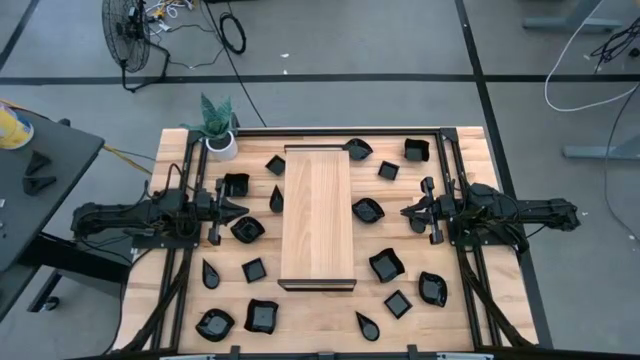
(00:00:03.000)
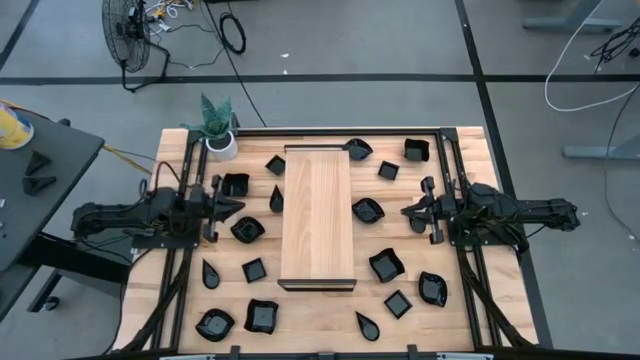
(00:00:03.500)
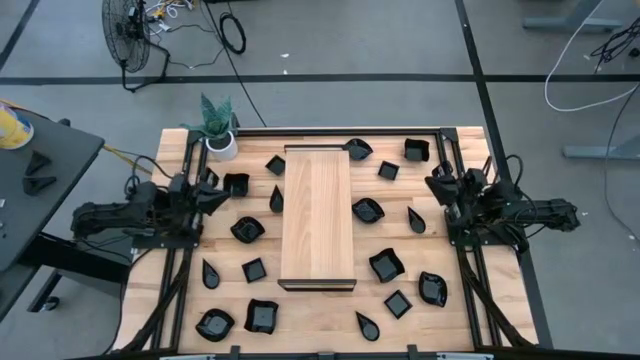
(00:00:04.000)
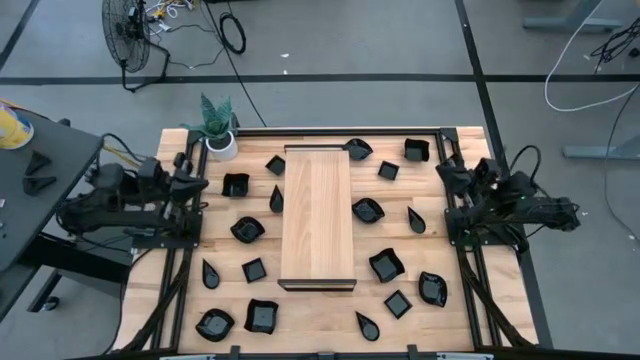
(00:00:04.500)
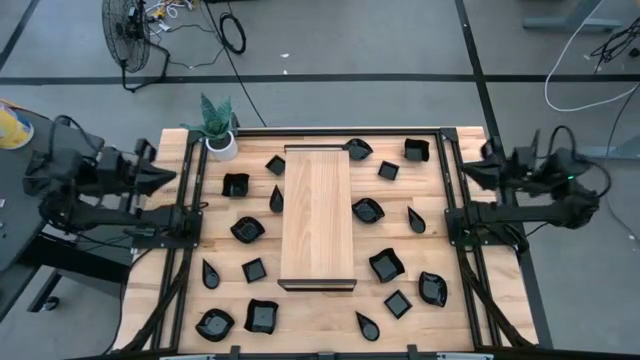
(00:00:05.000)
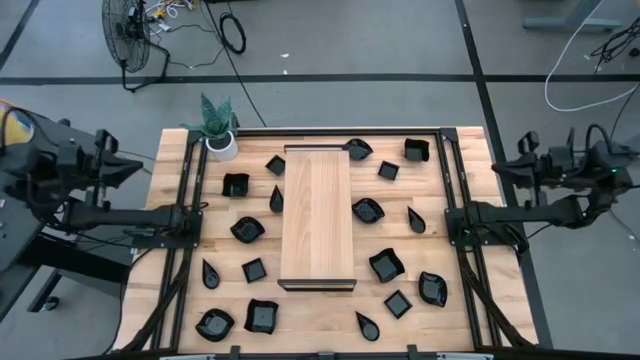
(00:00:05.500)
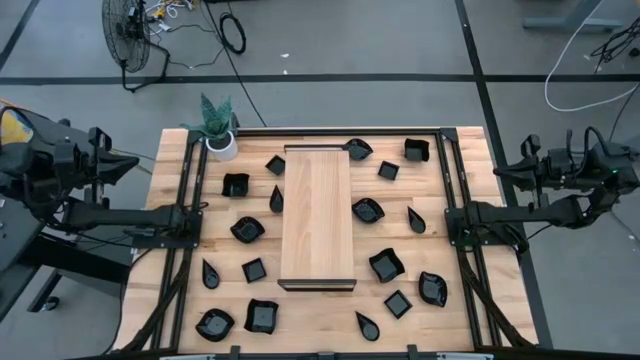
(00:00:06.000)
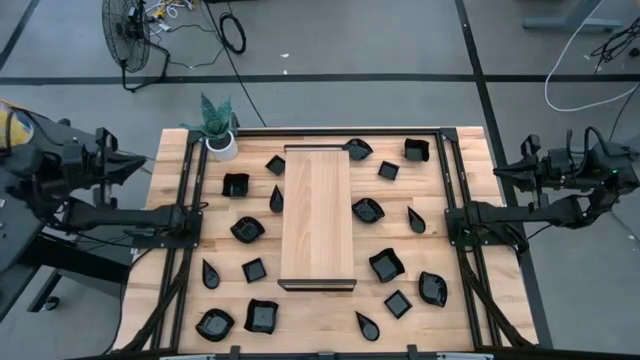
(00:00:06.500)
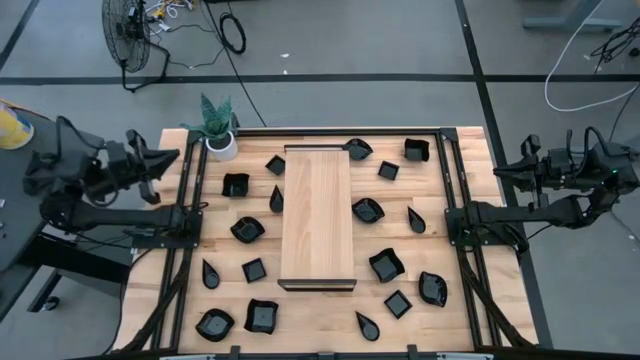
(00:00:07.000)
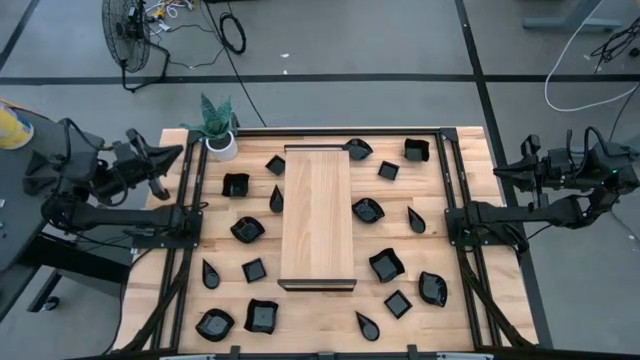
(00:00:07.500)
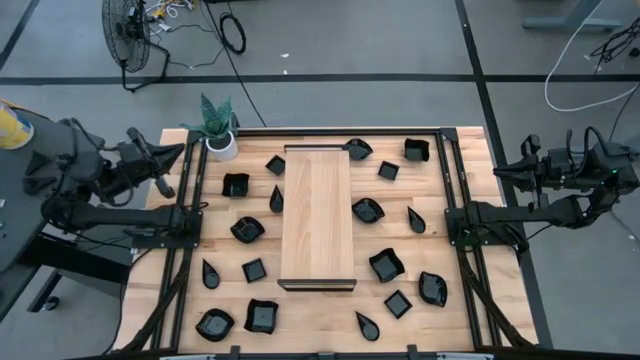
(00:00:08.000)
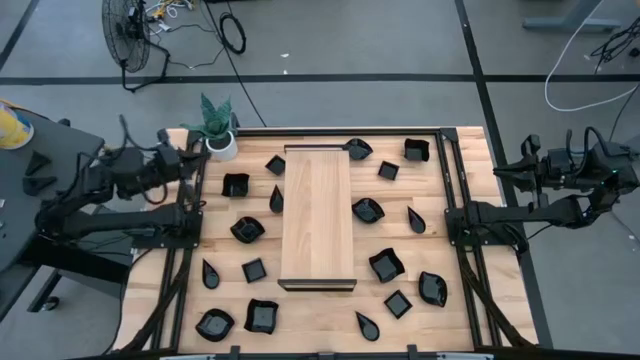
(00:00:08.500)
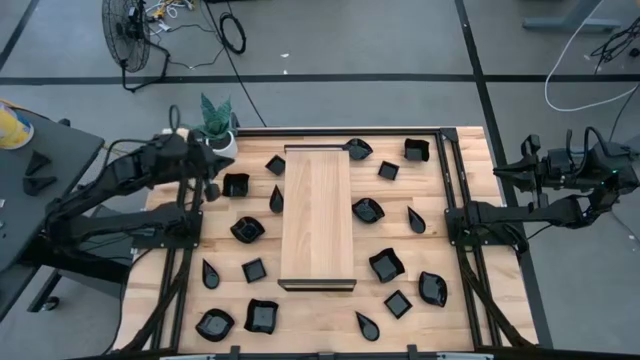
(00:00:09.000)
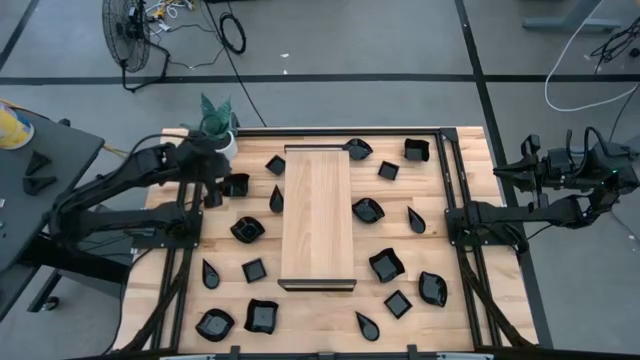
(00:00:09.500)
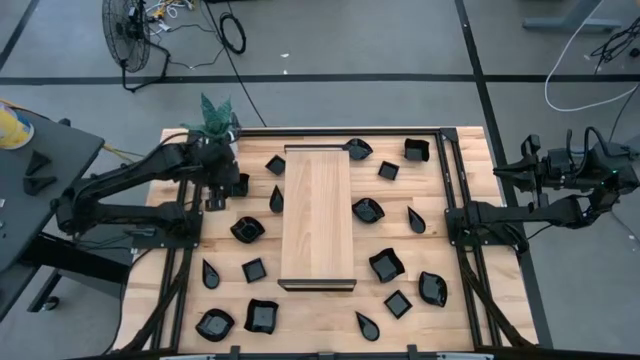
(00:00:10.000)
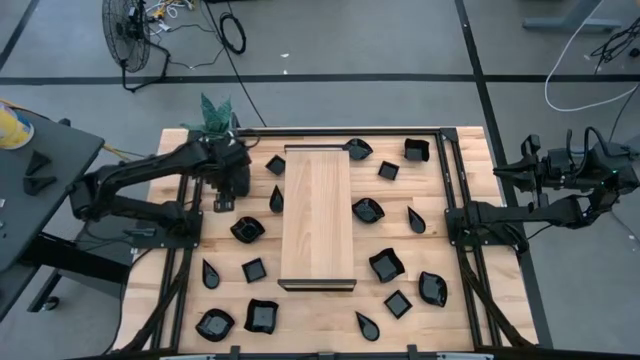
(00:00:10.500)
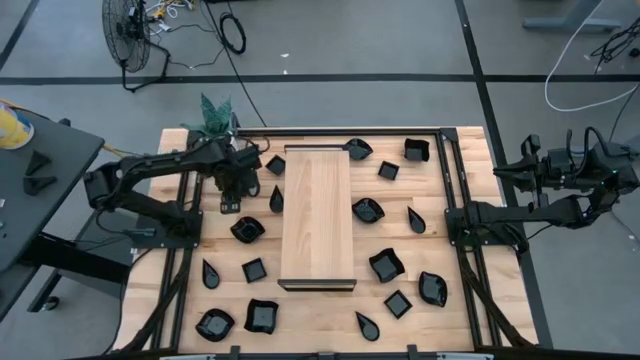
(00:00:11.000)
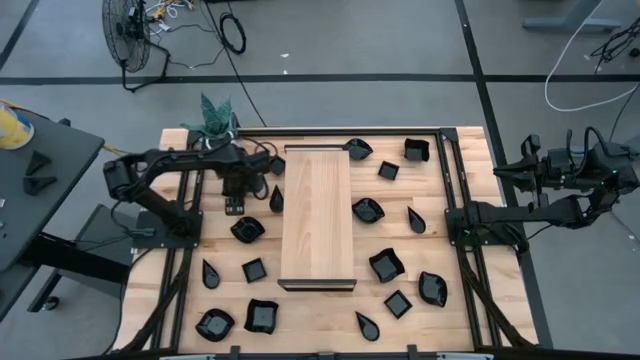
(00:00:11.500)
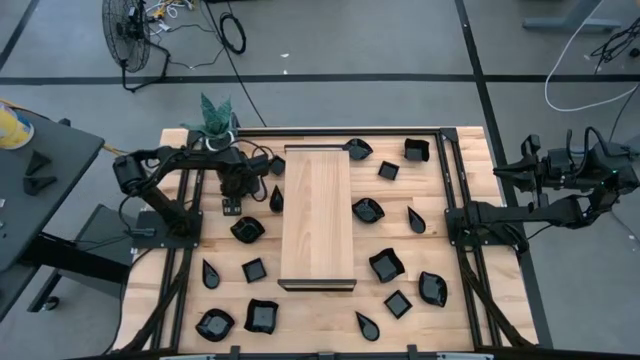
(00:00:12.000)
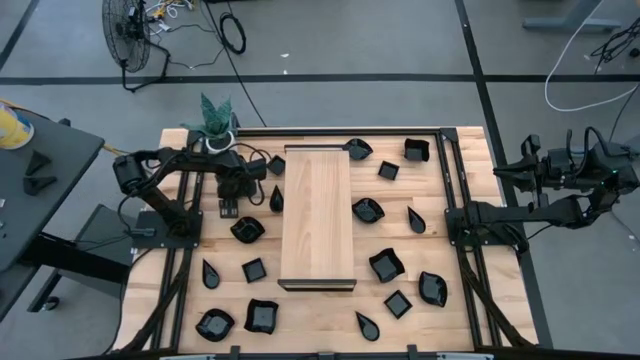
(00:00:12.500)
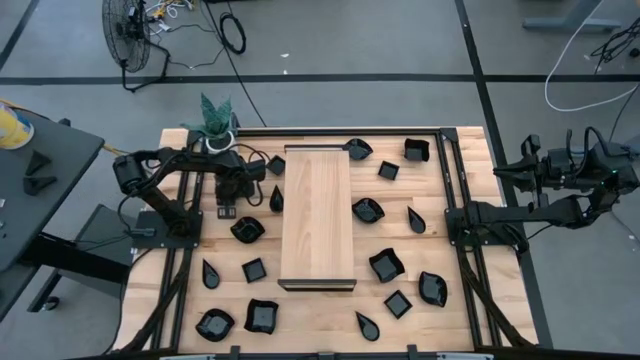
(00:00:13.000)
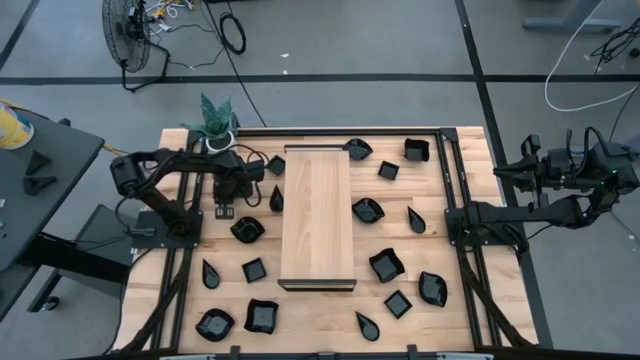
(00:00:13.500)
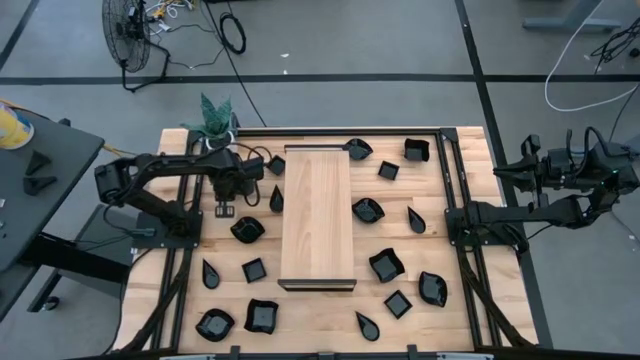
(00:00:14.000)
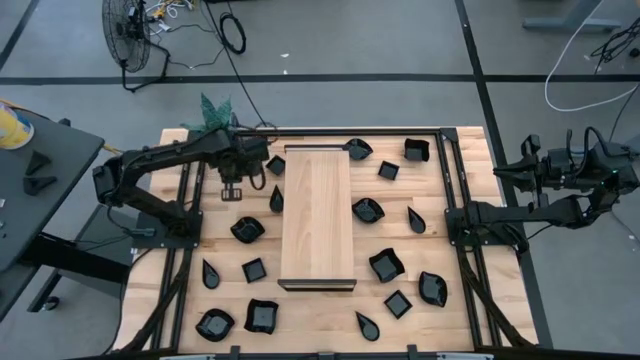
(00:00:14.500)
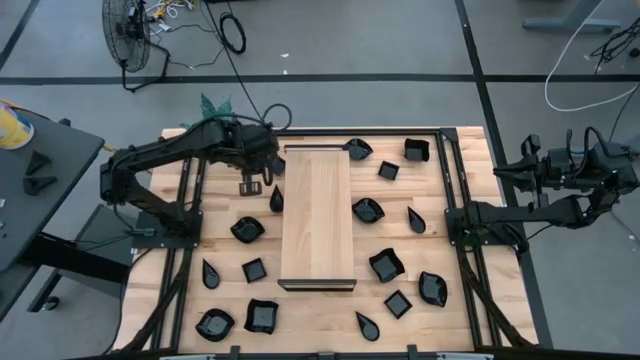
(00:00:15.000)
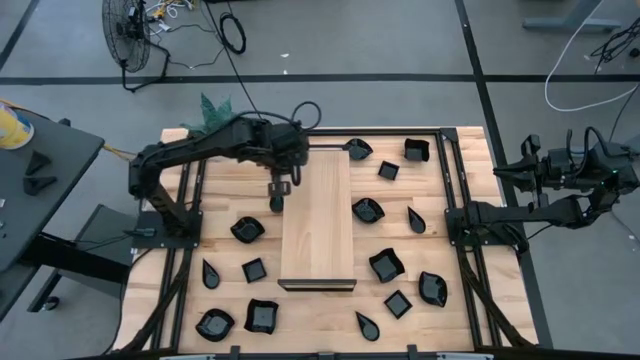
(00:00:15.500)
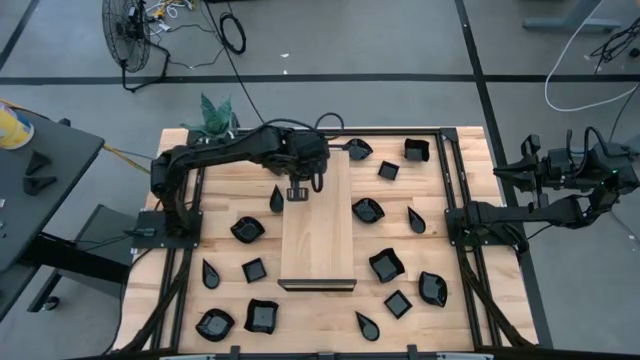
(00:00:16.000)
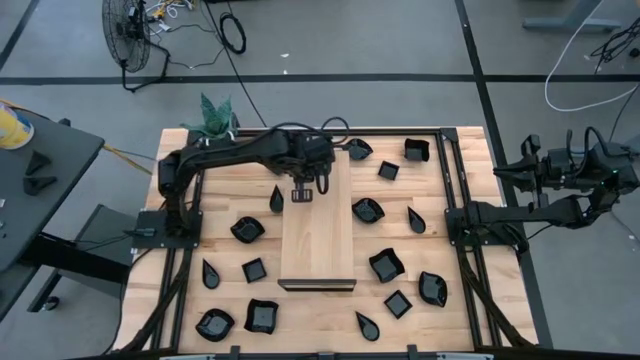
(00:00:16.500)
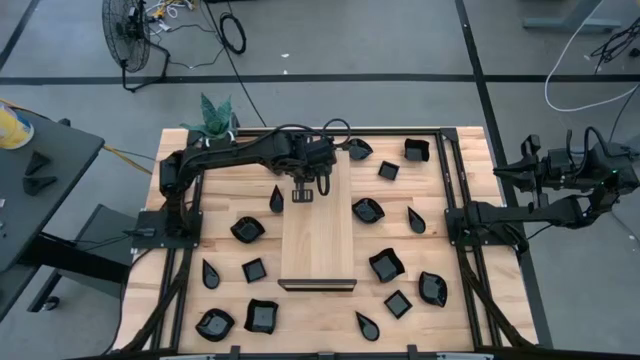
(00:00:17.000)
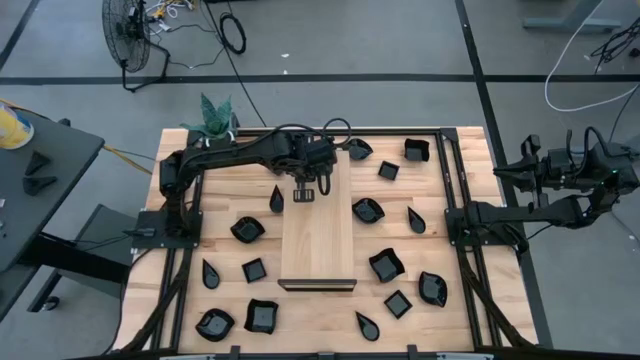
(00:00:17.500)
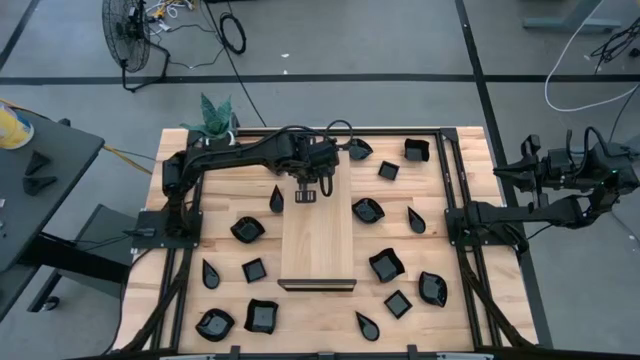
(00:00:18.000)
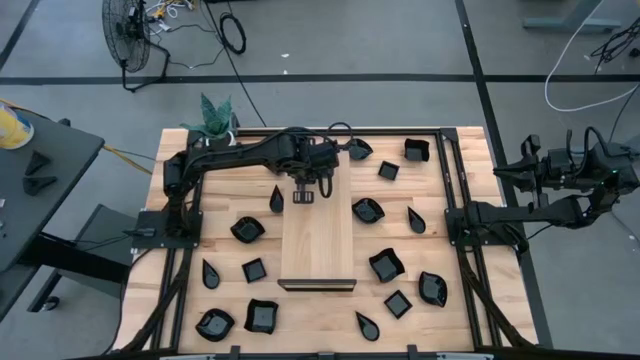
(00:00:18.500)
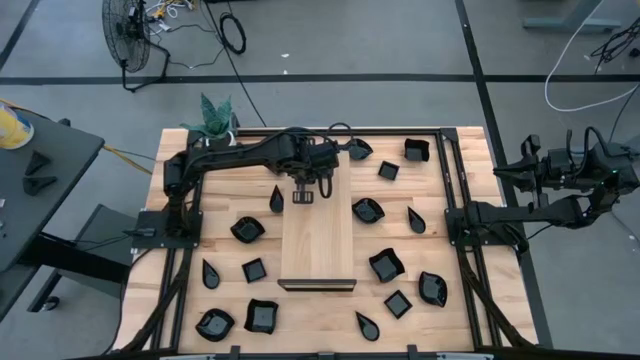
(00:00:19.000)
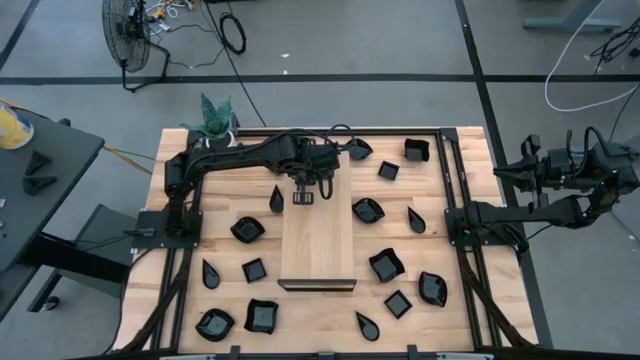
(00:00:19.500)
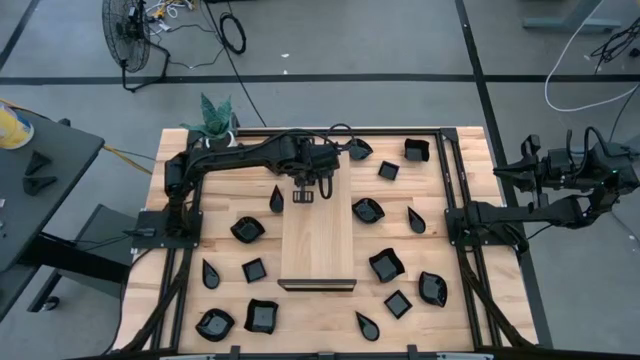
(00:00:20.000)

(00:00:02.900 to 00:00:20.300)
Task: Pick & Place Mini shaped plates
Put the distorted square plate on the shelf

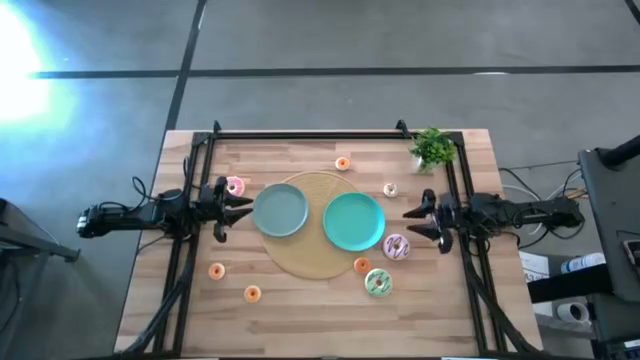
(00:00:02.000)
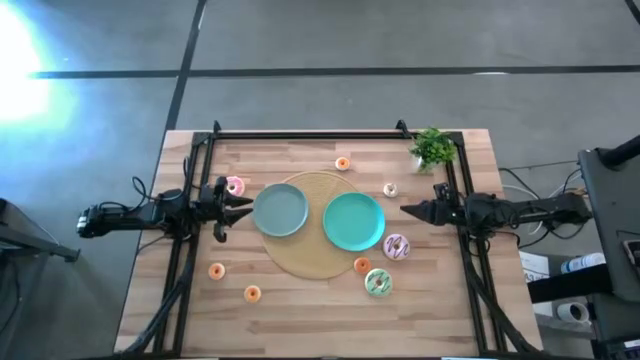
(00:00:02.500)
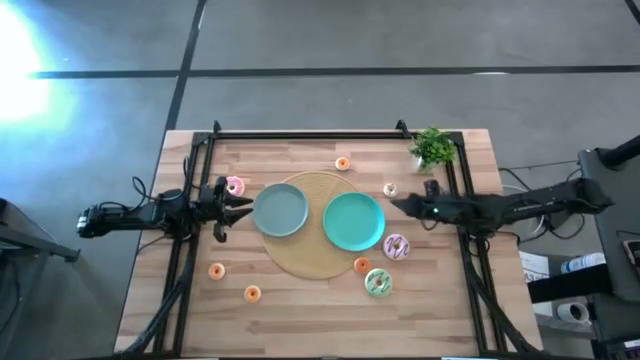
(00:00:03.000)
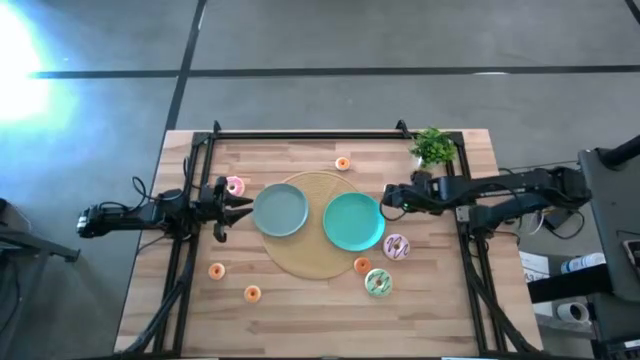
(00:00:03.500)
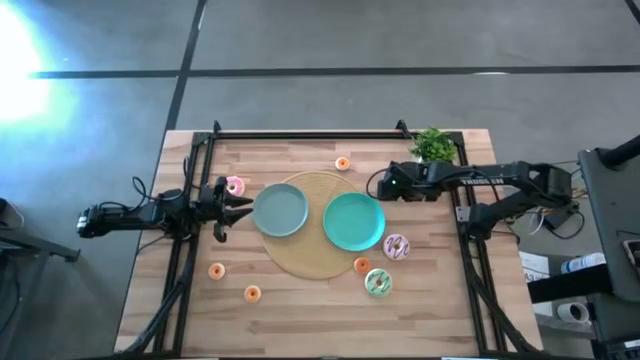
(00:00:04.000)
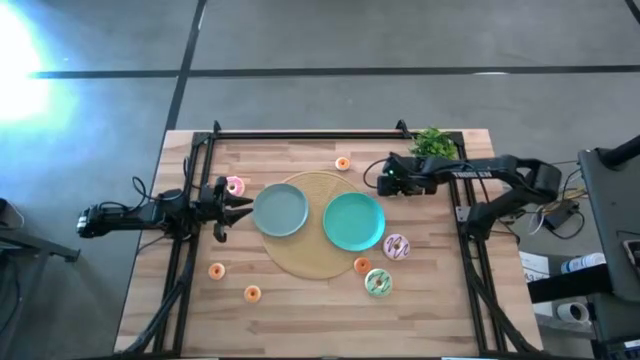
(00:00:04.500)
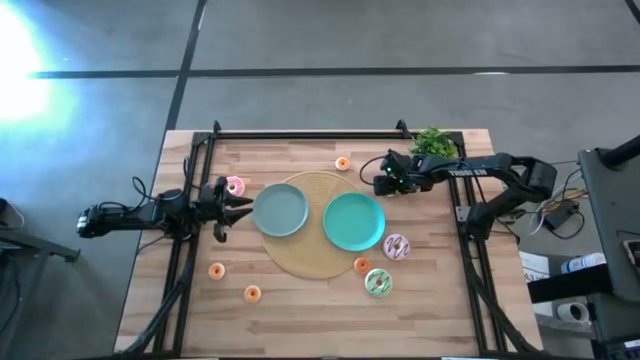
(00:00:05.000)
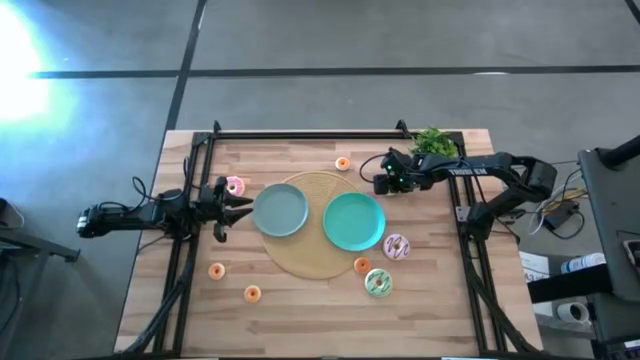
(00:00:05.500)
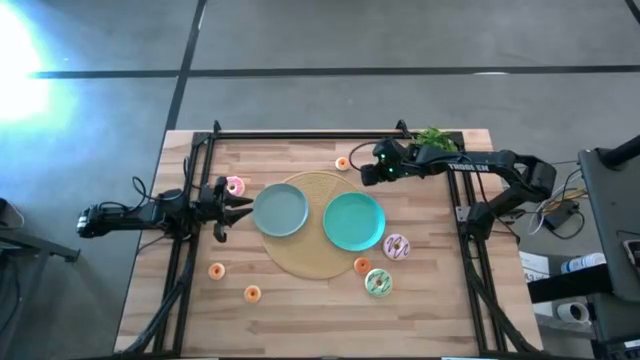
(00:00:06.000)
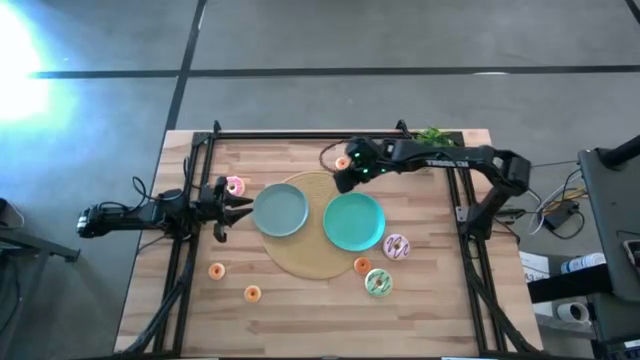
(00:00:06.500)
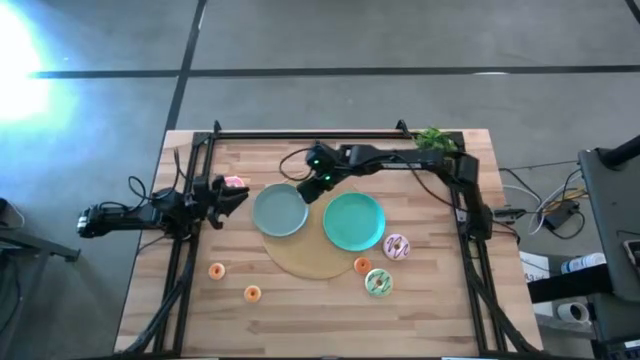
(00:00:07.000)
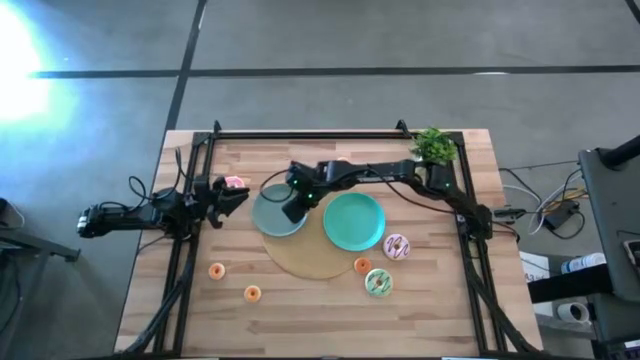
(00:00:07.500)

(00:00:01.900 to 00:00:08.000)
Task: Pick & Place donuts
Put the small white donut on the light blue plate
